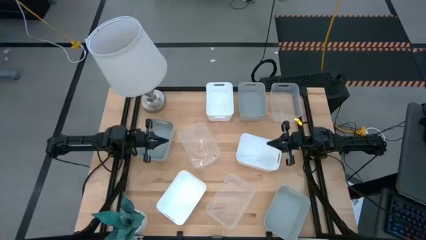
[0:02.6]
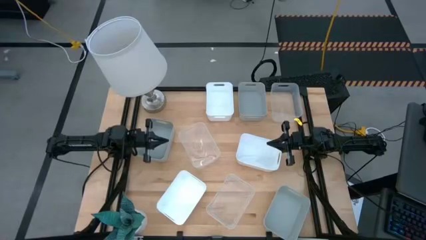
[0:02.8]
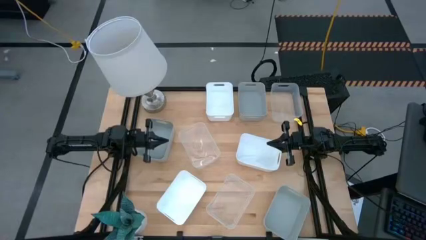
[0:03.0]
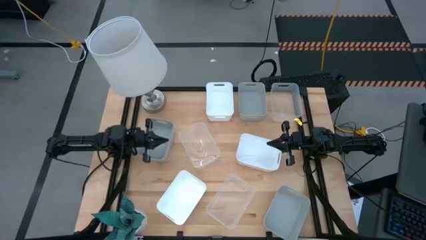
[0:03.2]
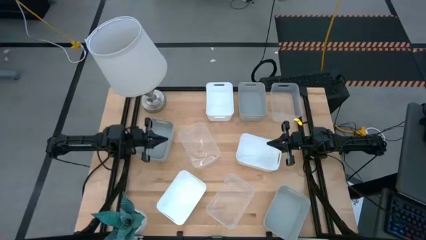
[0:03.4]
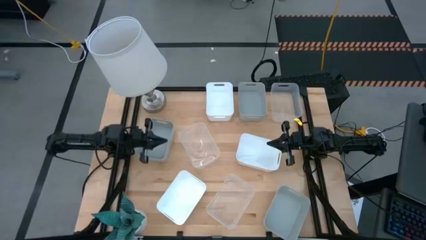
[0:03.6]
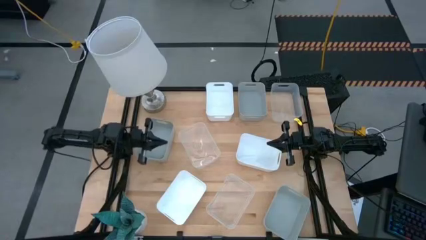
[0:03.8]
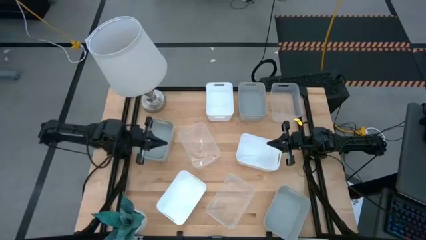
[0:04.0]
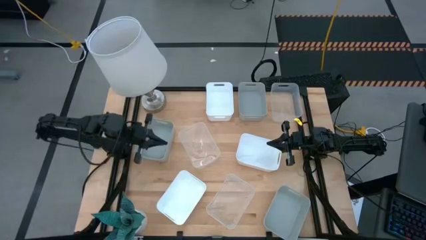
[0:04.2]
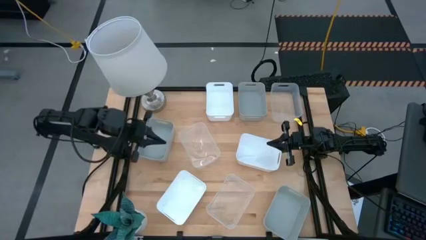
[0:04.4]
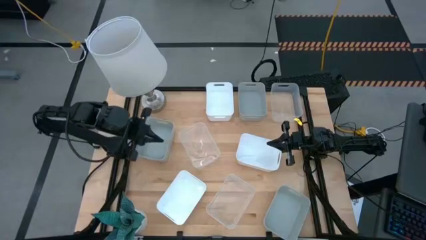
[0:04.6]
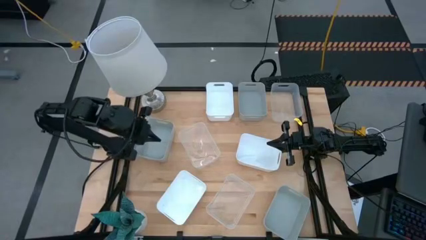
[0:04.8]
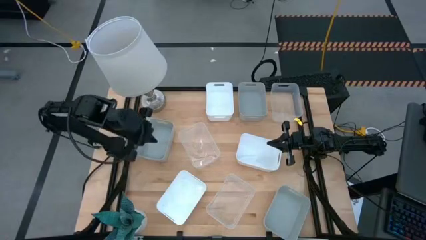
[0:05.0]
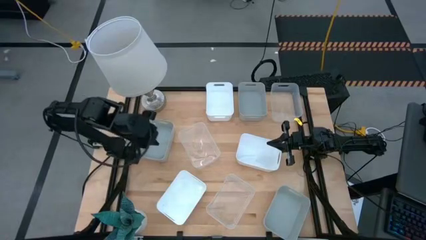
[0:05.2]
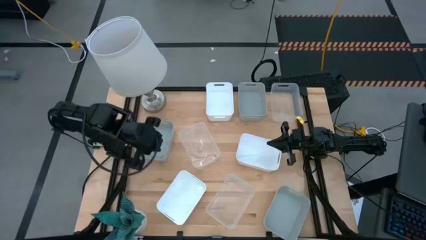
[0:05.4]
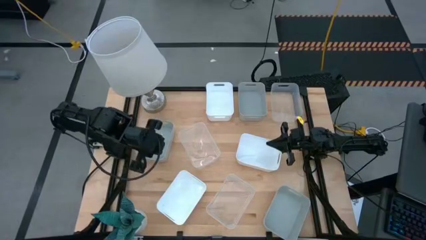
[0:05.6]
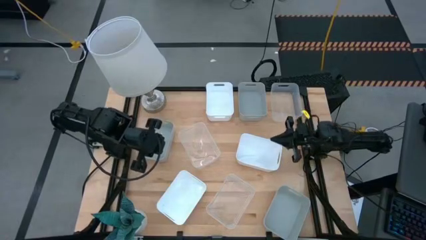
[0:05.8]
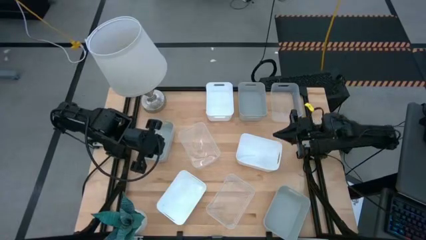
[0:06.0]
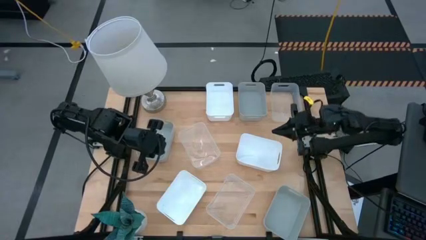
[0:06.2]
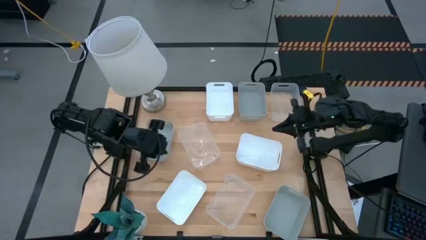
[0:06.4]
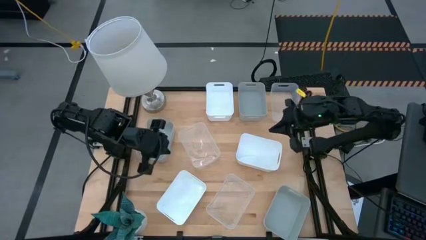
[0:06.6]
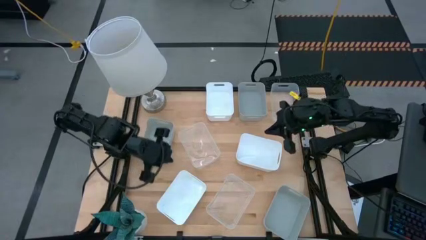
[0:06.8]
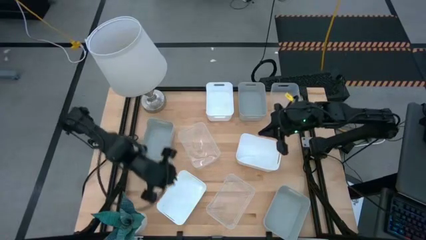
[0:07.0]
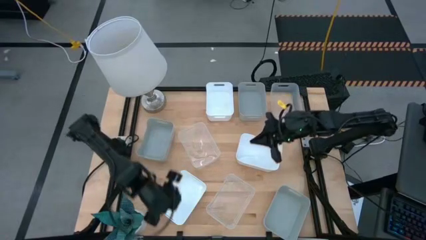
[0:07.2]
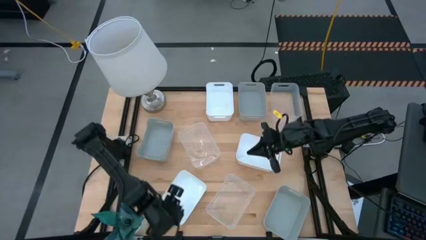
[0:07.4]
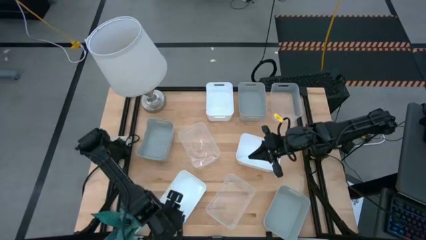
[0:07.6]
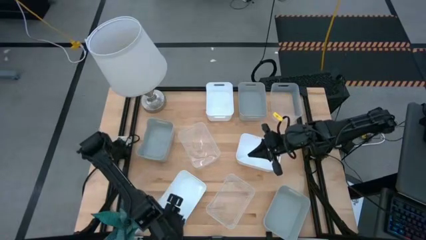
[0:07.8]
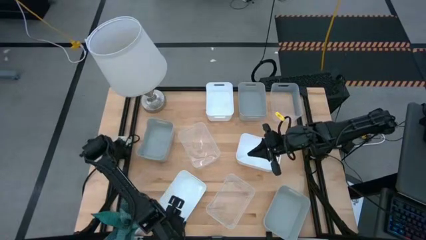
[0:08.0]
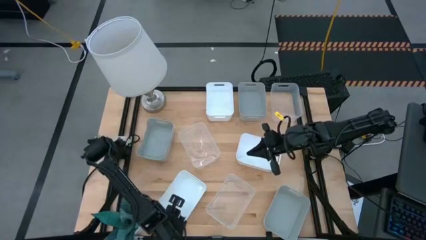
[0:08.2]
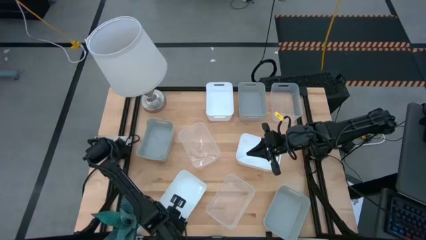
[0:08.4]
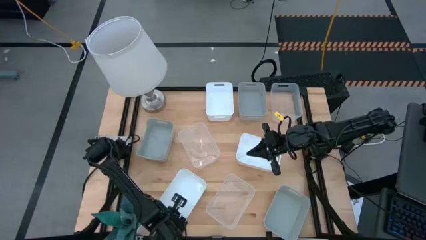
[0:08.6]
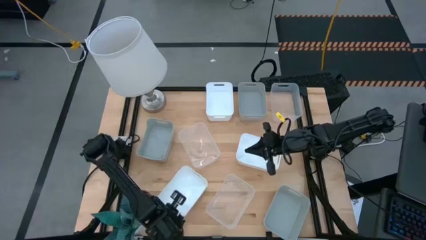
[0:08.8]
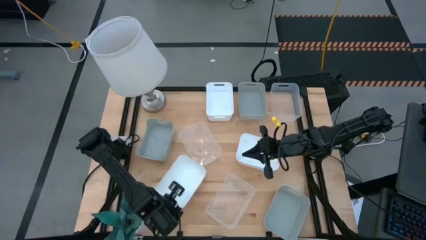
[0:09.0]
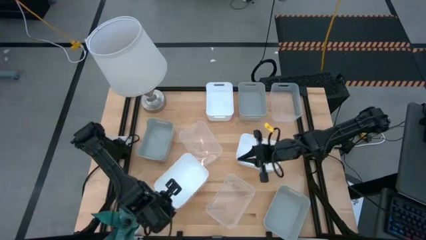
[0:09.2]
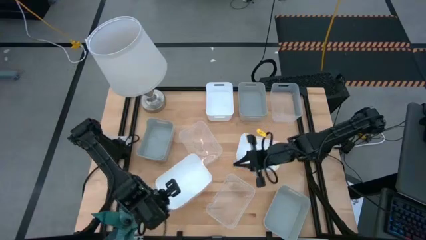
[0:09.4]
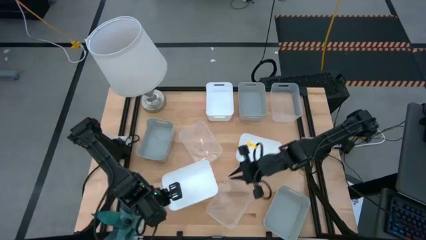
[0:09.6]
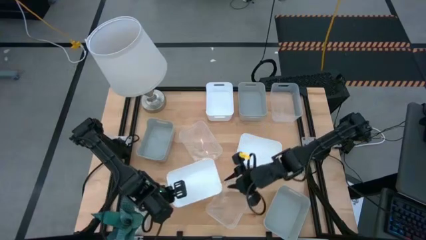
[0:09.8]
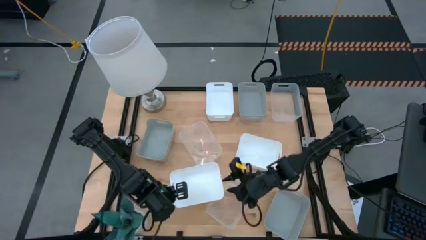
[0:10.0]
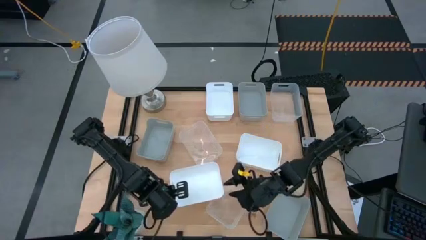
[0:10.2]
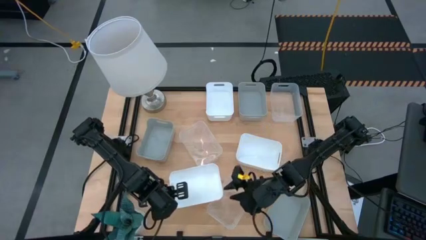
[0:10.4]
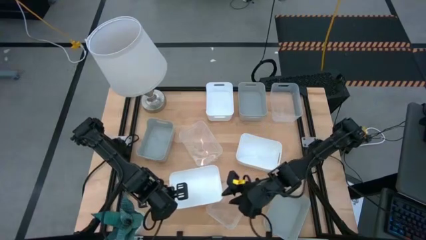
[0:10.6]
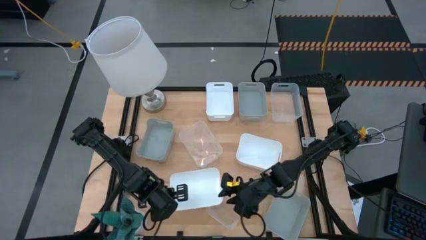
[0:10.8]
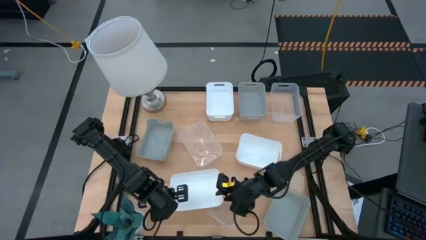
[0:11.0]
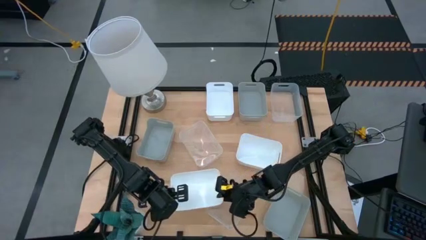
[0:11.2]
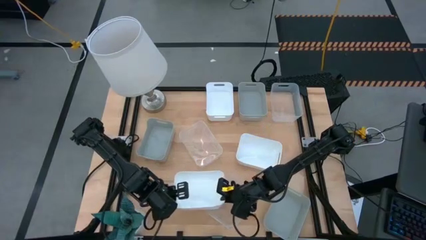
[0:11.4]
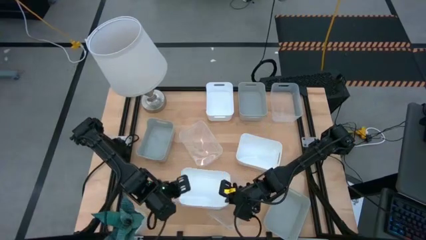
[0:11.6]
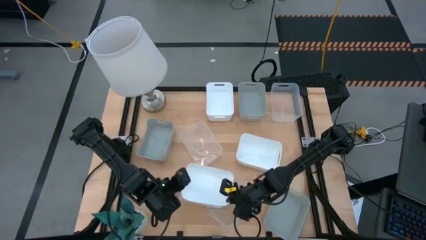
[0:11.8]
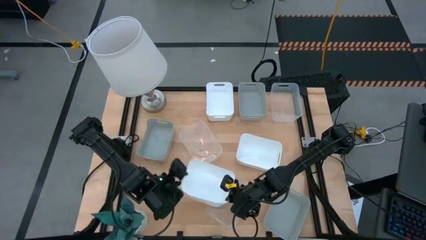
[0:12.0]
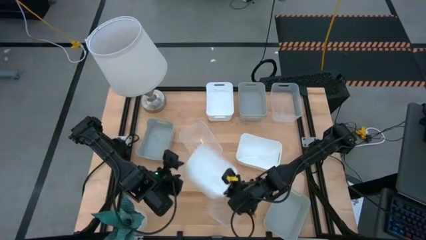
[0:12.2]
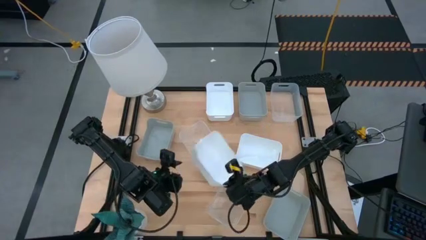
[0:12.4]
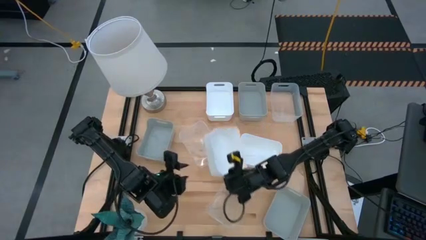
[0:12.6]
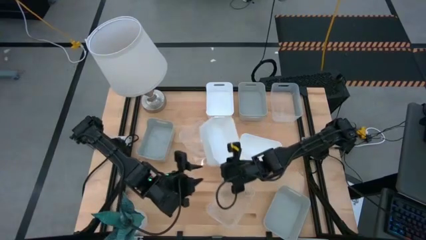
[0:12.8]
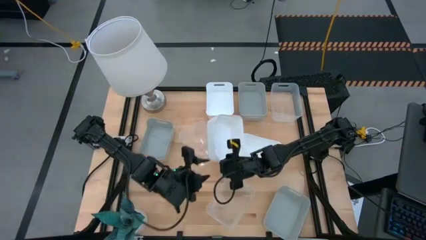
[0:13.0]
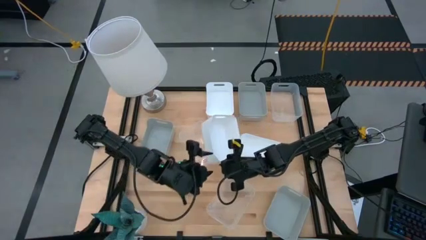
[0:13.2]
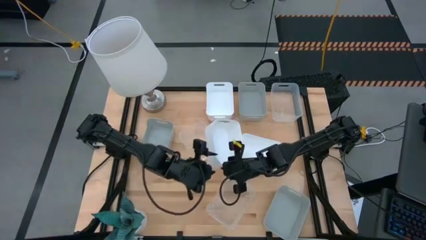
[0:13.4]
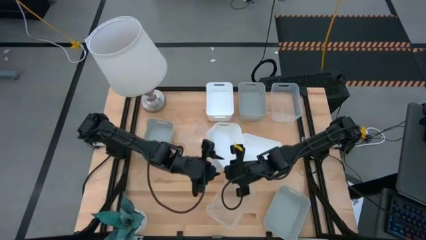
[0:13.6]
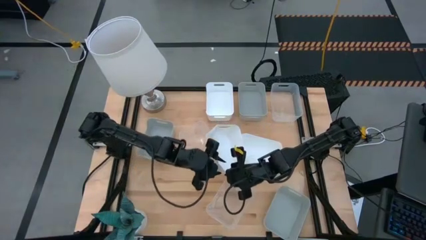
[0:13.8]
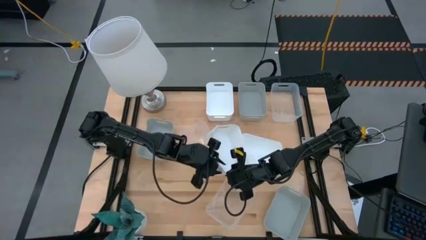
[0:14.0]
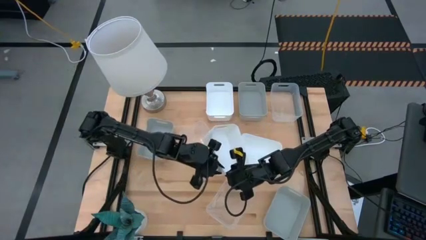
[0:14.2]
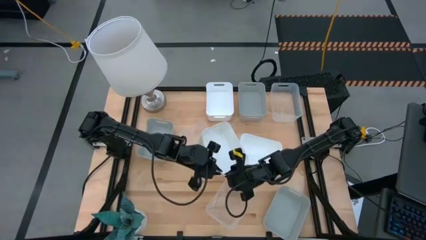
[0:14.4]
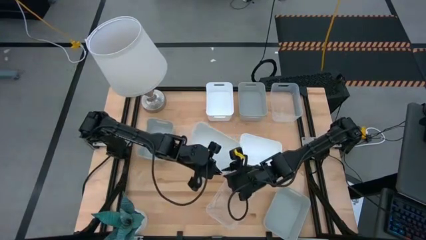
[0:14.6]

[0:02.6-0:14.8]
Stack the bottom white bin on top of the top white bin
